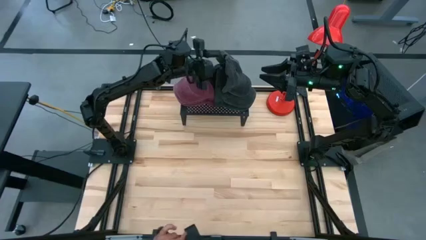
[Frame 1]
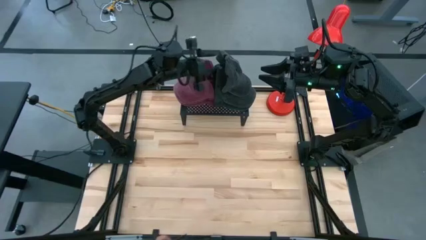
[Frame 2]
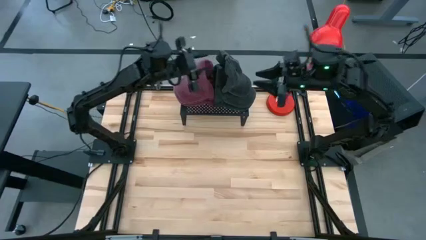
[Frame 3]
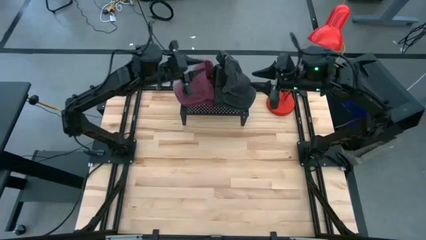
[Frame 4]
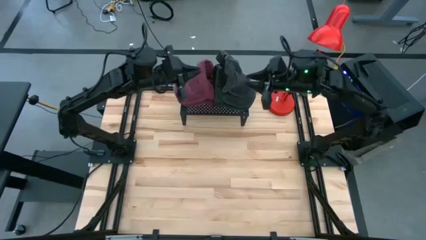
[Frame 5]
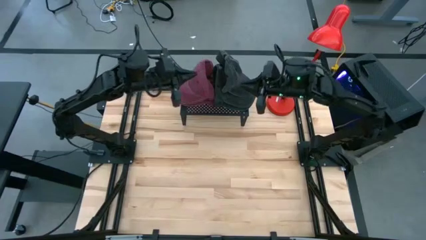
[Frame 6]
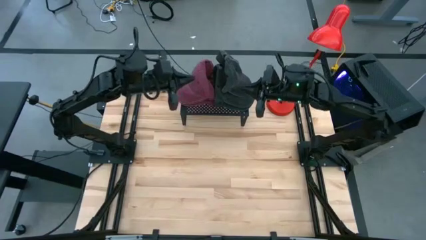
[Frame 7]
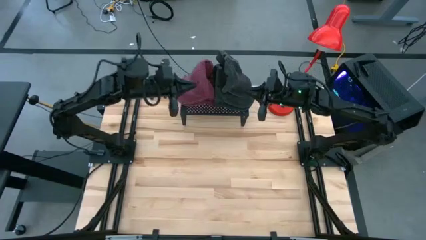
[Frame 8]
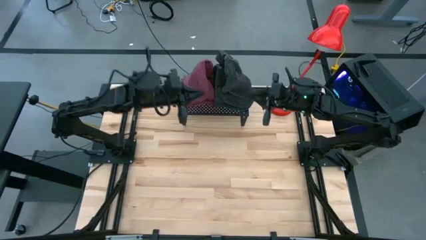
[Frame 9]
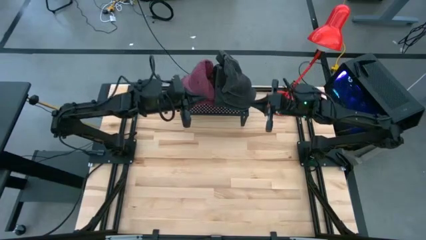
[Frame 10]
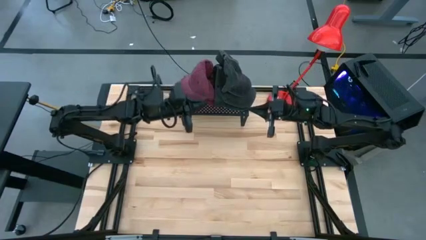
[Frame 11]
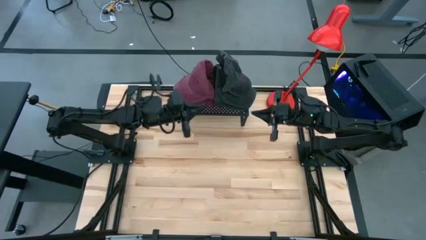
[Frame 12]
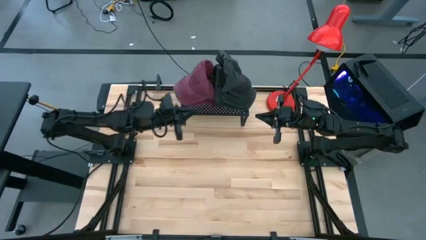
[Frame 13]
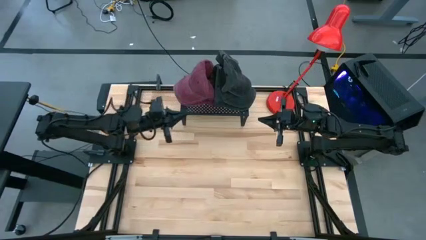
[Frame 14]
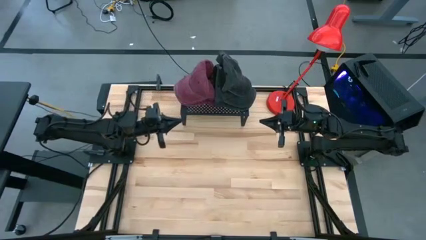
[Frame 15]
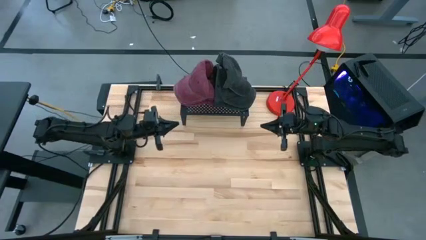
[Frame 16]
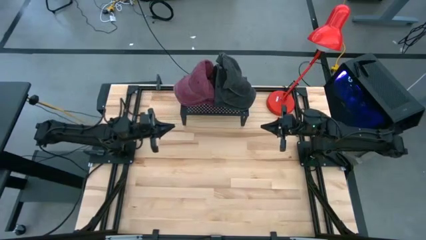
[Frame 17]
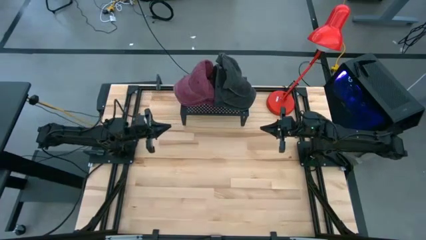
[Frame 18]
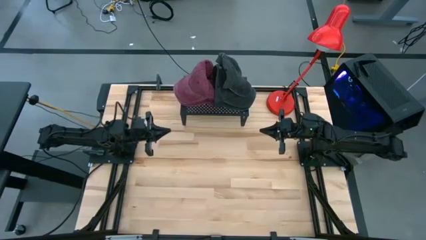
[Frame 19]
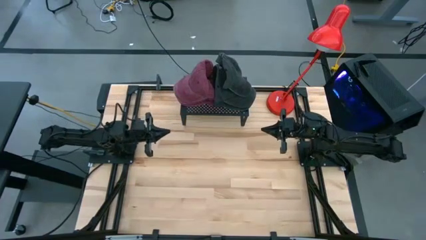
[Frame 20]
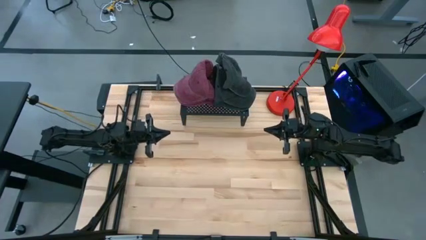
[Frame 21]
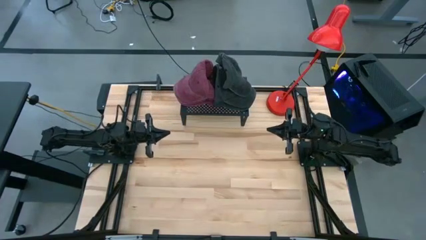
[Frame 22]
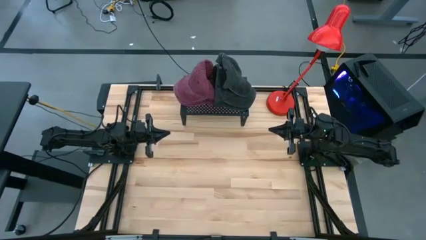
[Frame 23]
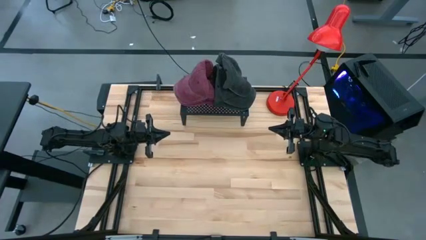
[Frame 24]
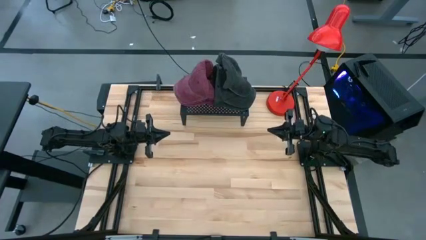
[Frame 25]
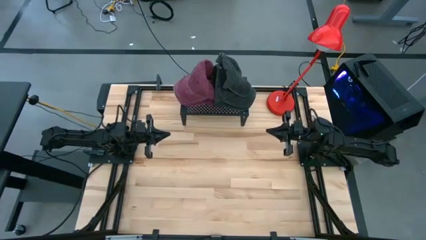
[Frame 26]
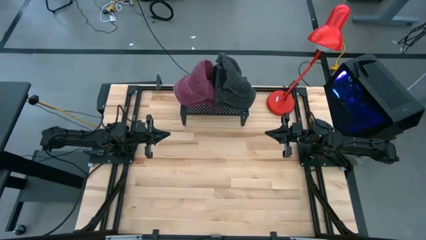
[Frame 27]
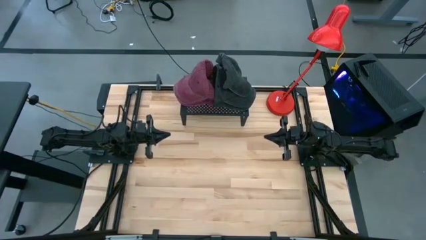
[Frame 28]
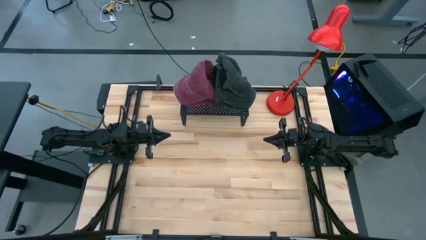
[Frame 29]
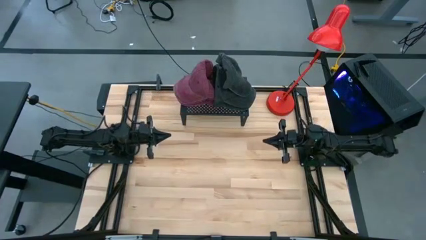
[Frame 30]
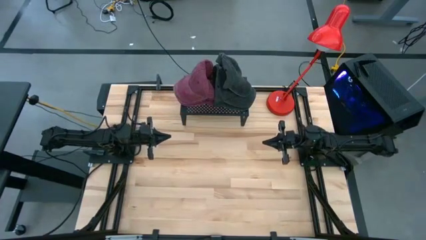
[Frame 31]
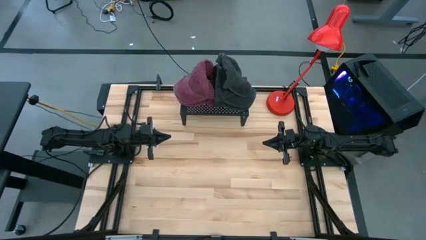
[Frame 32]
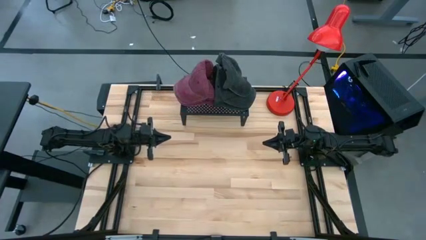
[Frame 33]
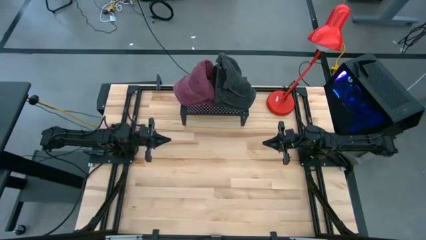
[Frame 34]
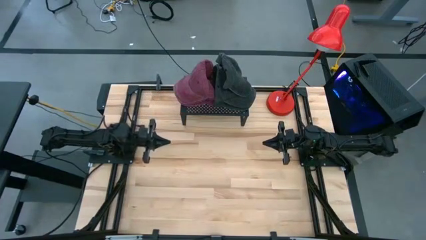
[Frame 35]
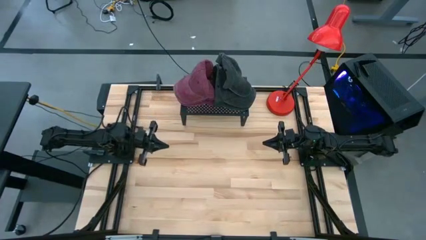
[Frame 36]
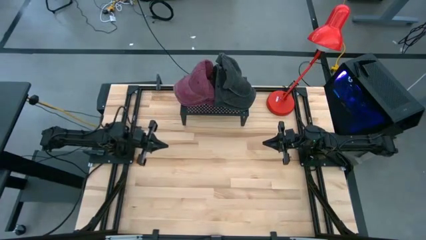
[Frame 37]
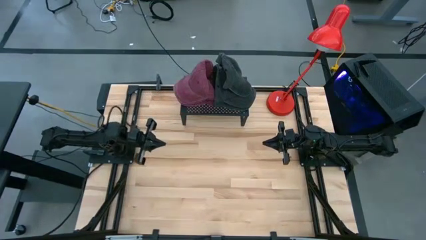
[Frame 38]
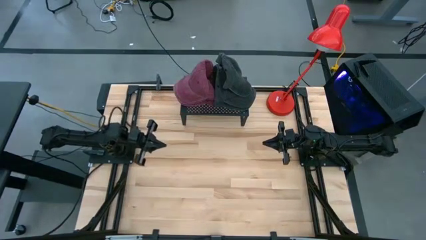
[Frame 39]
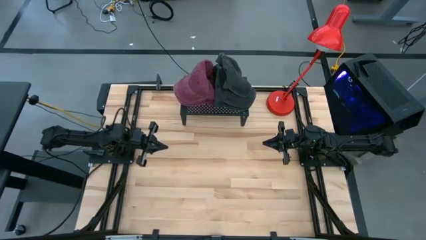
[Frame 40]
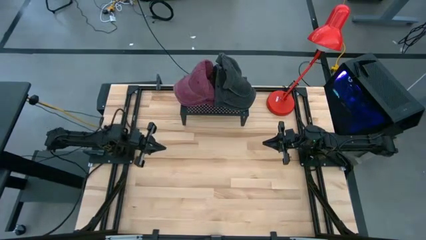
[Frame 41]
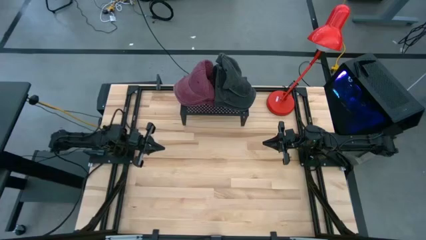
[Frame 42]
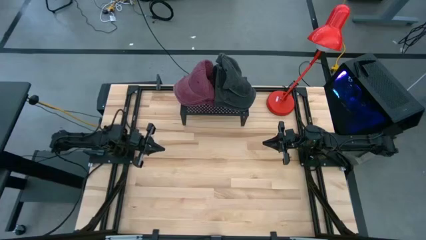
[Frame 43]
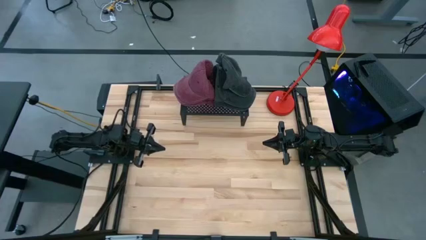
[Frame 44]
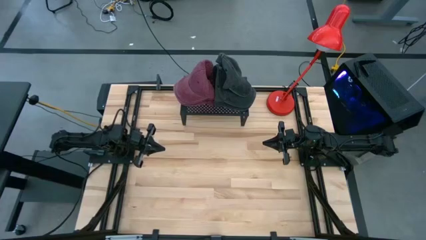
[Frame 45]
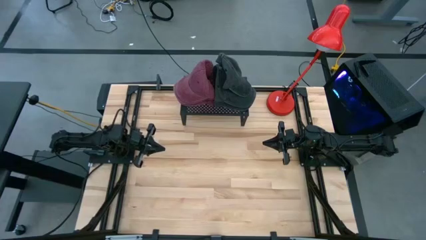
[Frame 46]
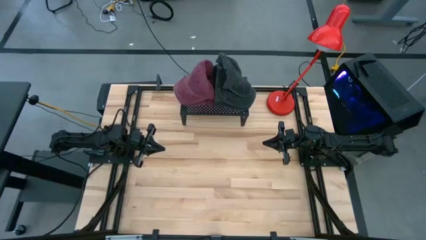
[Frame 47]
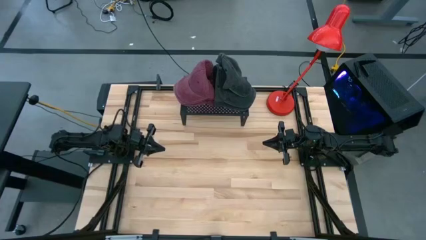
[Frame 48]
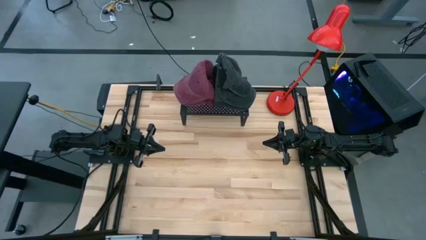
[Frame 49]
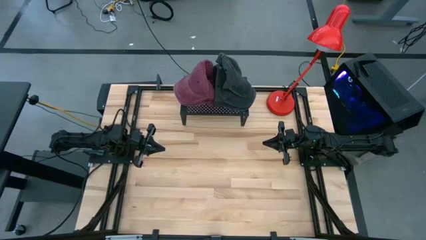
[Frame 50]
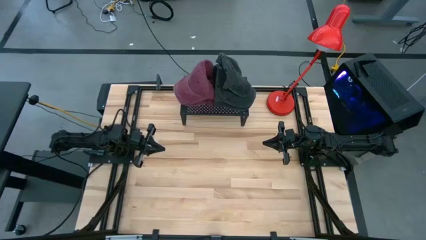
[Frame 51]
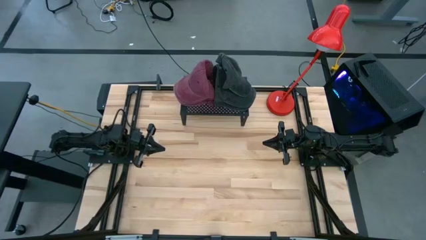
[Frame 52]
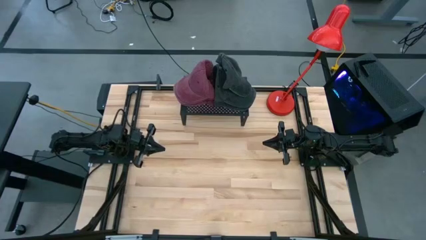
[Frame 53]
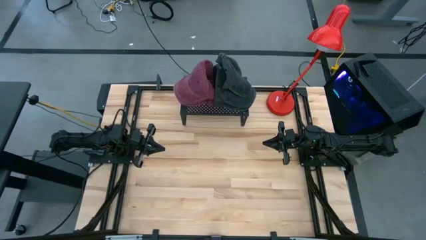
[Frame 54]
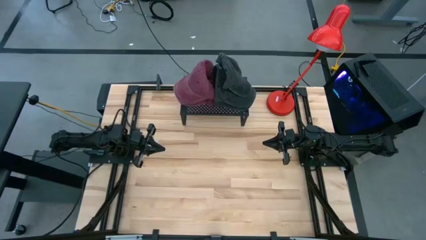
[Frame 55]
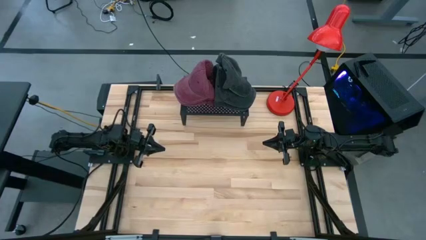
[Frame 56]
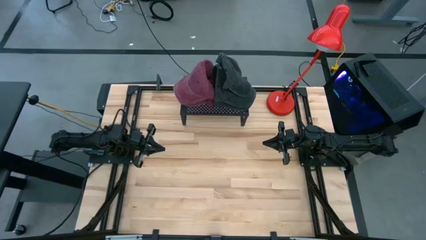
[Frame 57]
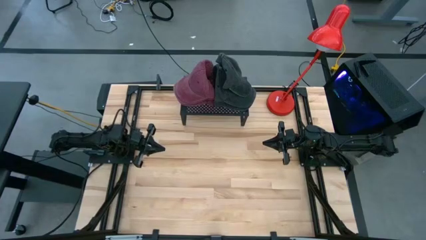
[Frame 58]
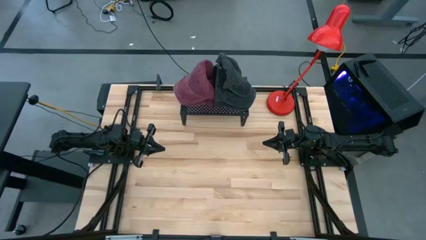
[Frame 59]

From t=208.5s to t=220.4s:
Task: Pick & Place hat
Return to Home Position

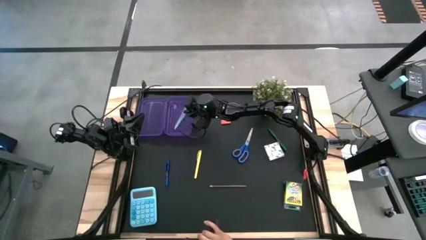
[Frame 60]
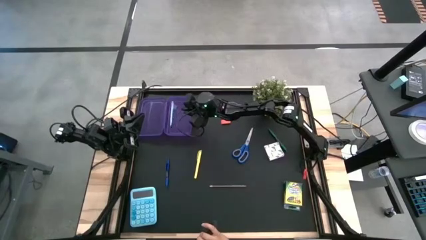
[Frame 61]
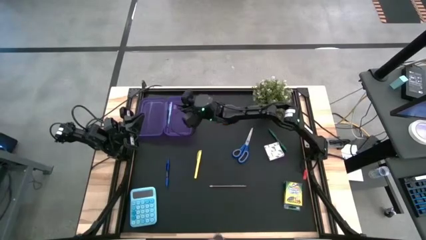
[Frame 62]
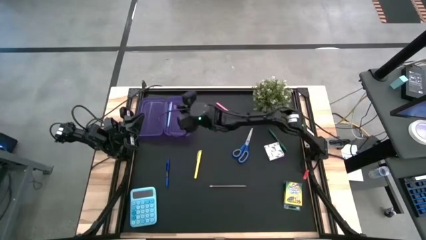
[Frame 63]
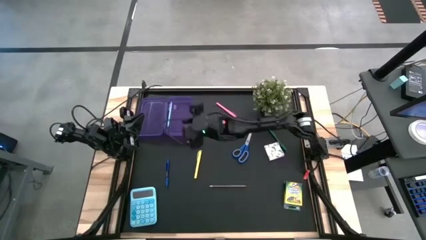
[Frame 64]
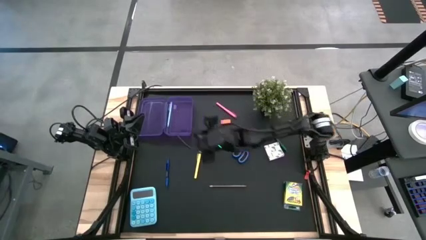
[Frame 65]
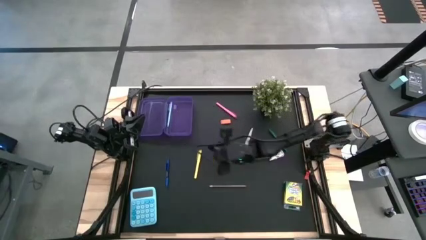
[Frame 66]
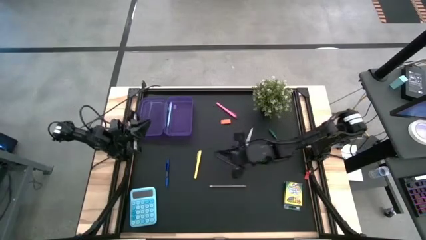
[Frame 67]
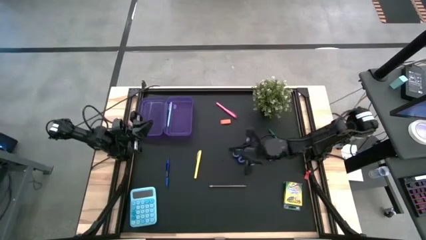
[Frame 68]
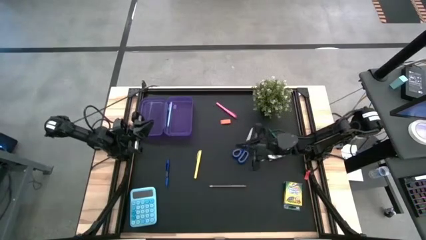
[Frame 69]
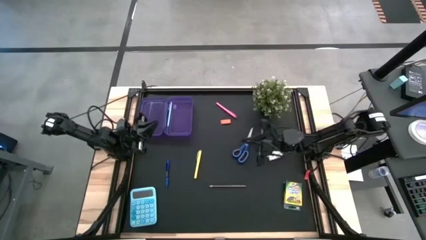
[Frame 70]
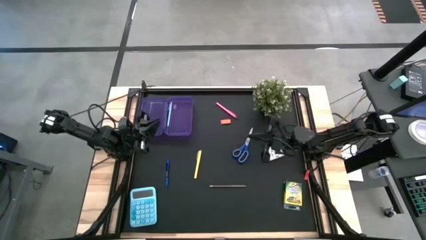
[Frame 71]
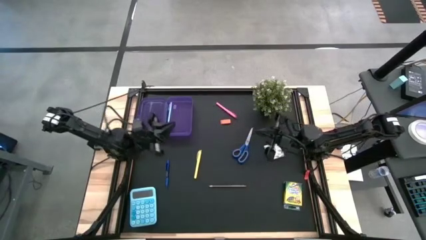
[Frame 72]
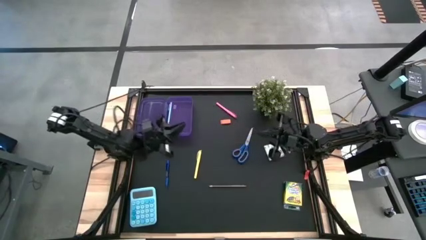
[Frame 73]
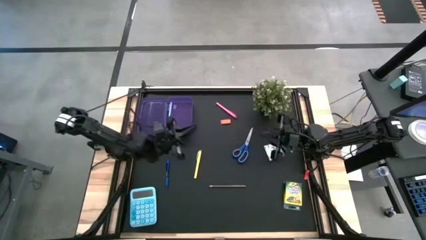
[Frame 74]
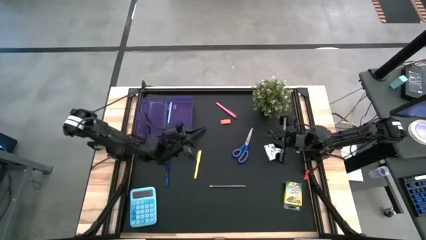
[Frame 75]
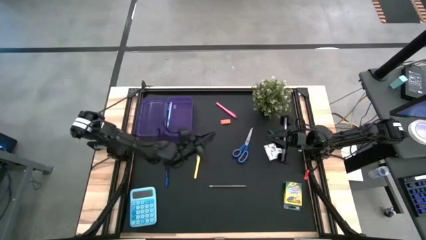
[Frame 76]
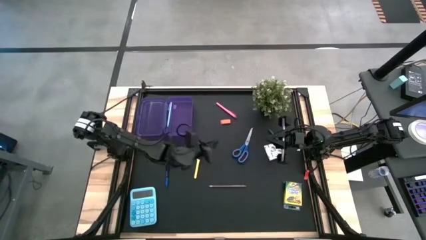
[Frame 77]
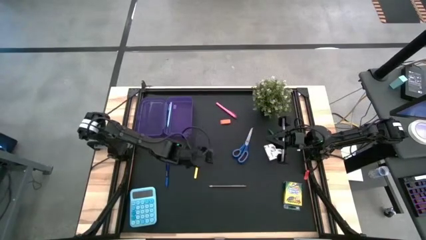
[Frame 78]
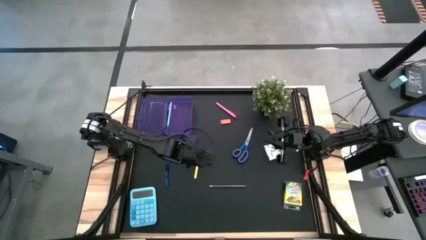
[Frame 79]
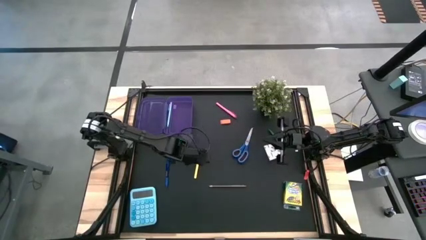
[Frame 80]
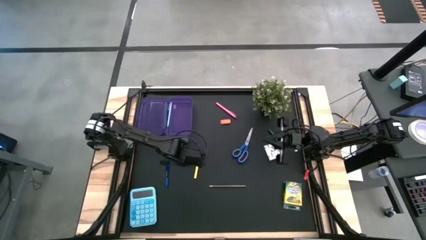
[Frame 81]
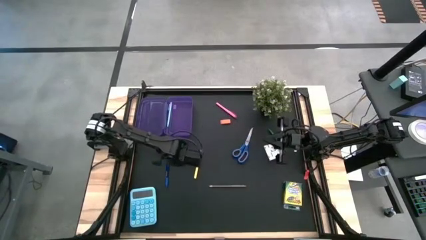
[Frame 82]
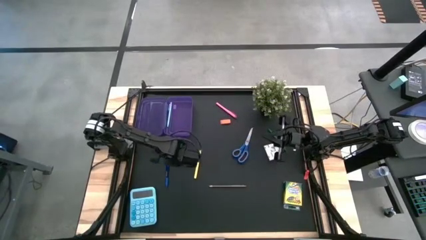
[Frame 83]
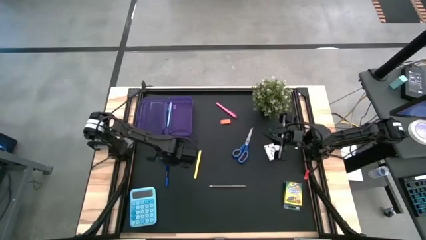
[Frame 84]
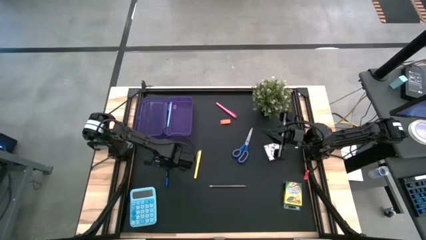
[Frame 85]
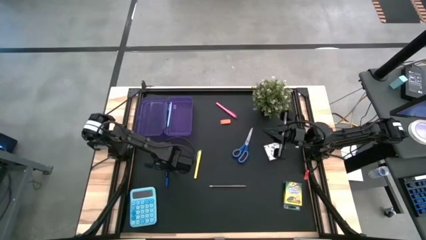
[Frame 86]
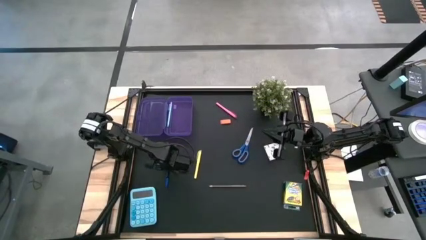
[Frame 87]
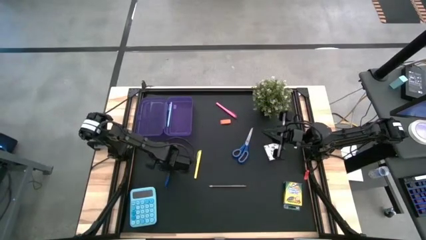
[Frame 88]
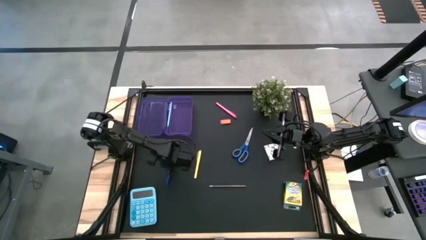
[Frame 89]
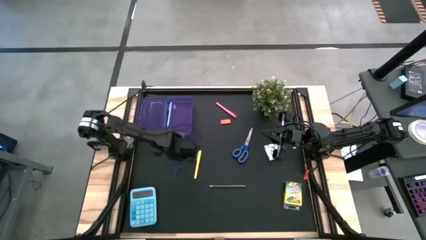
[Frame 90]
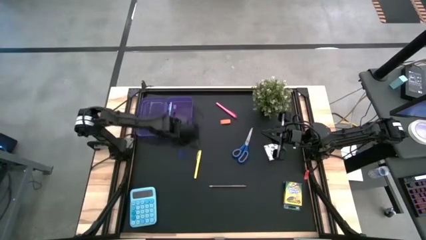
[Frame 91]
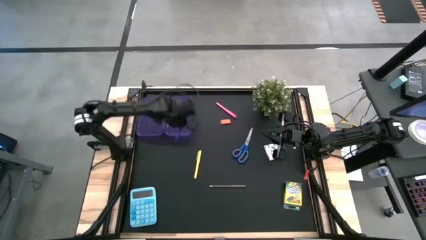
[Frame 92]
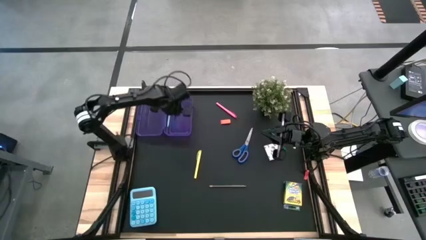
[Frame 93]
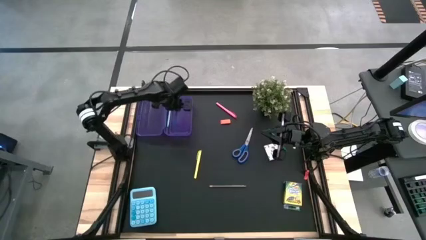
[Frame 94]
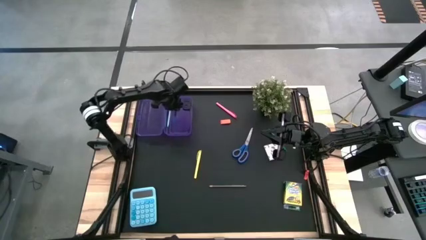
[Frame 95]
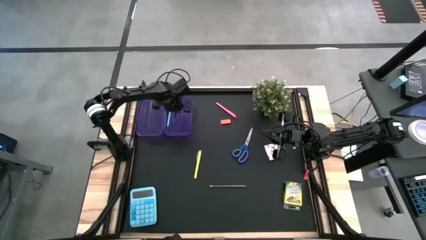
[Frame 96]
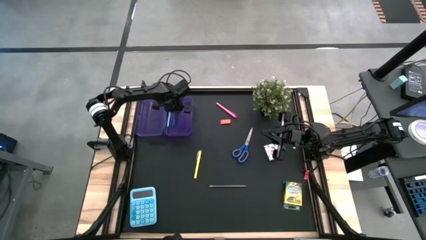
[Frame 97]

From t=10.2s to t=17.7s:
Task: Pack school essentials
Put the blue pen into the purple box
